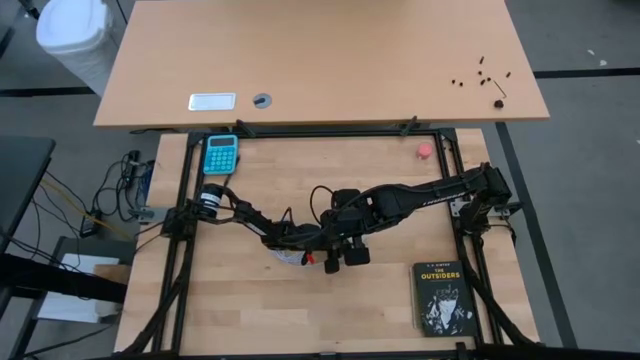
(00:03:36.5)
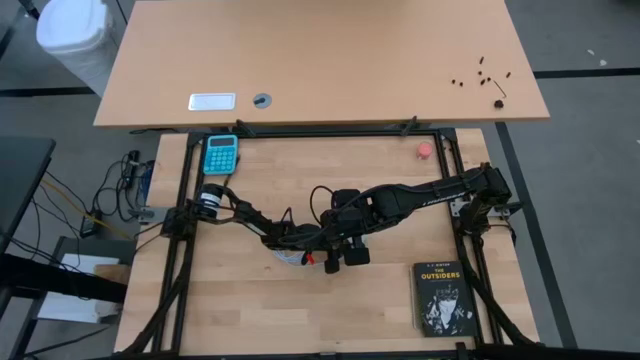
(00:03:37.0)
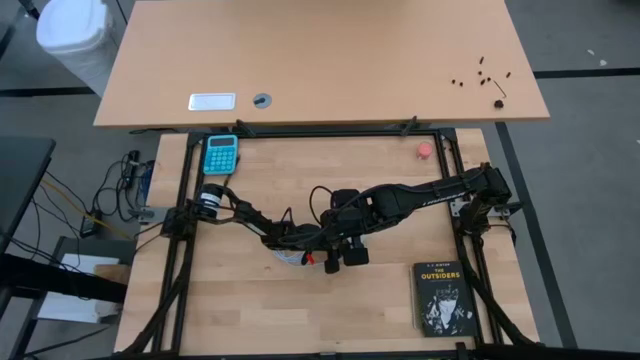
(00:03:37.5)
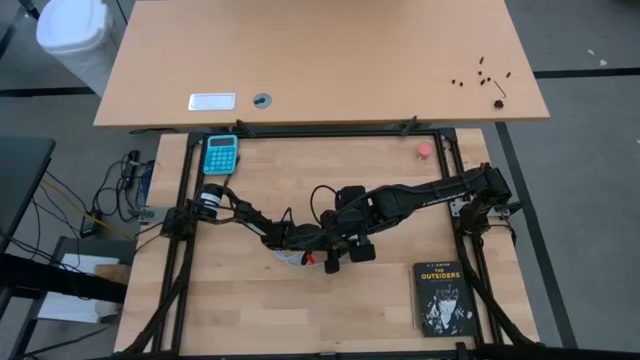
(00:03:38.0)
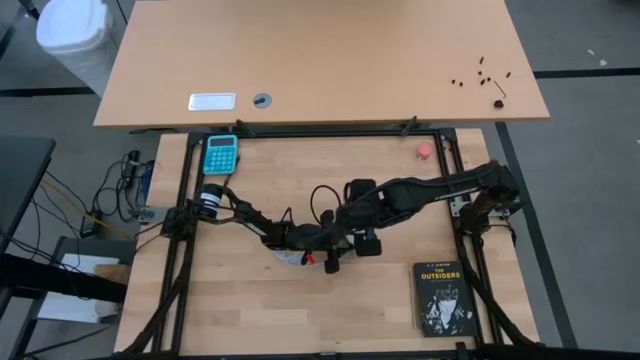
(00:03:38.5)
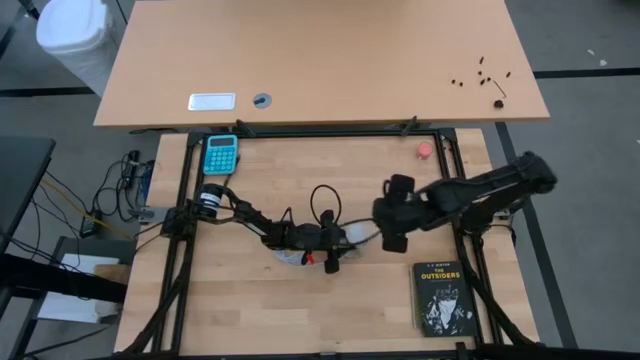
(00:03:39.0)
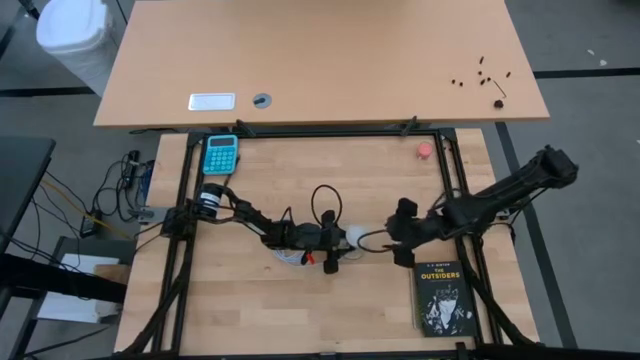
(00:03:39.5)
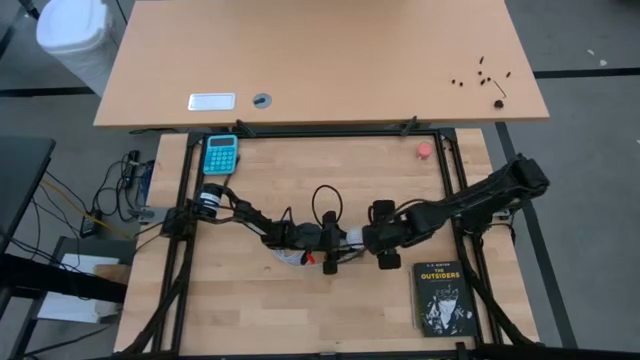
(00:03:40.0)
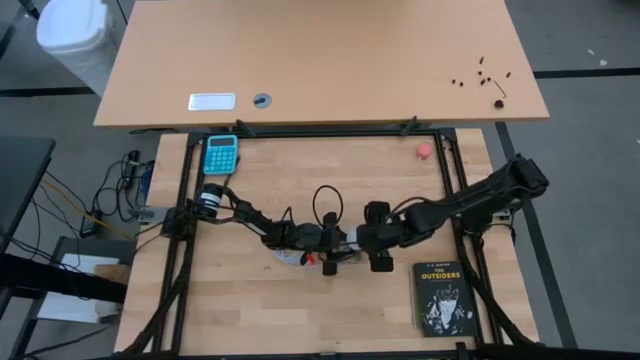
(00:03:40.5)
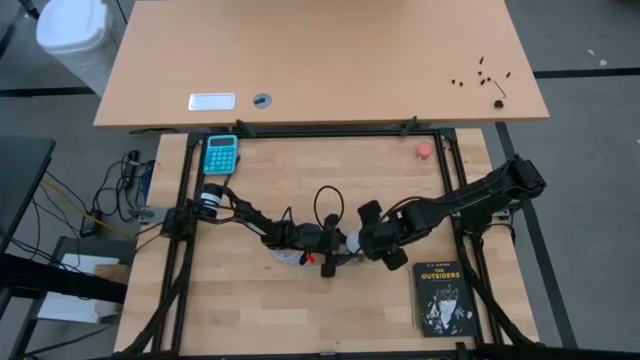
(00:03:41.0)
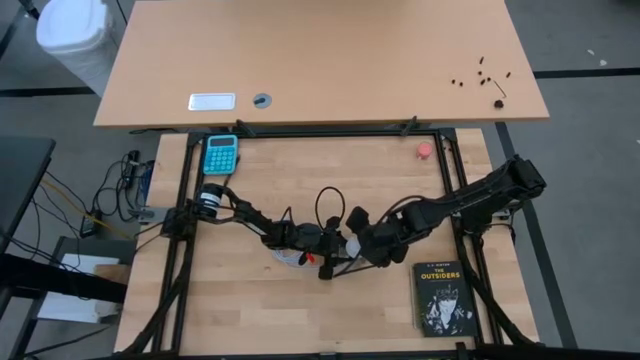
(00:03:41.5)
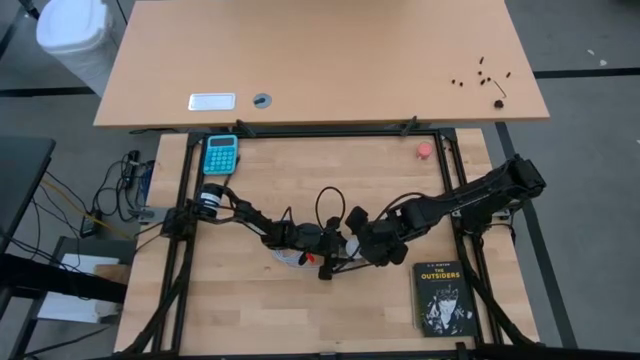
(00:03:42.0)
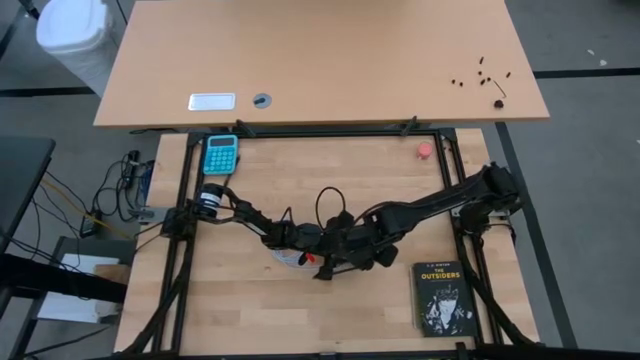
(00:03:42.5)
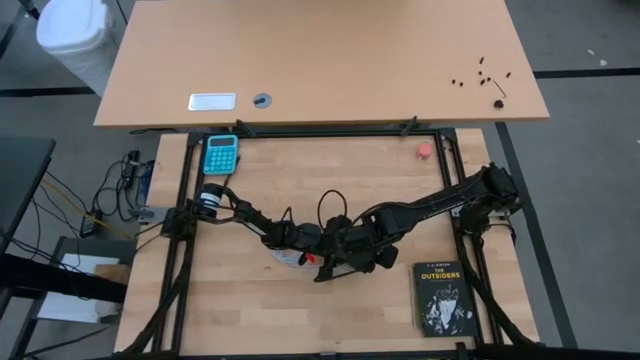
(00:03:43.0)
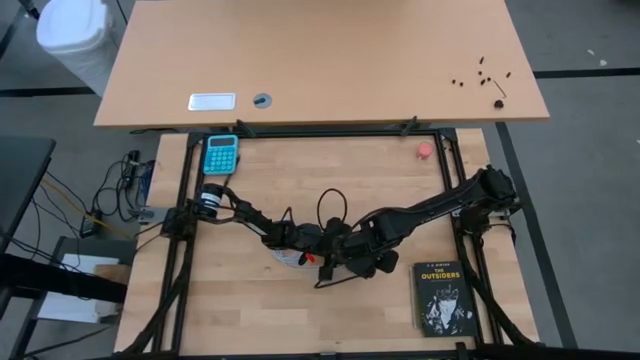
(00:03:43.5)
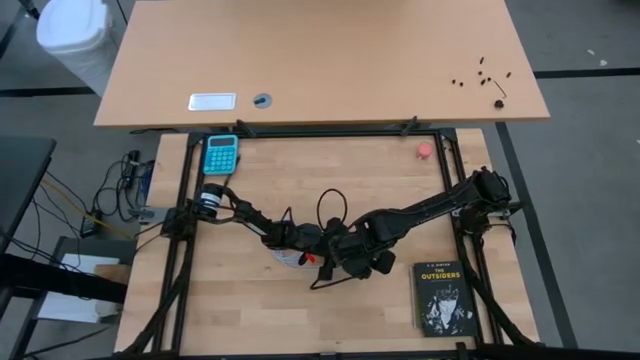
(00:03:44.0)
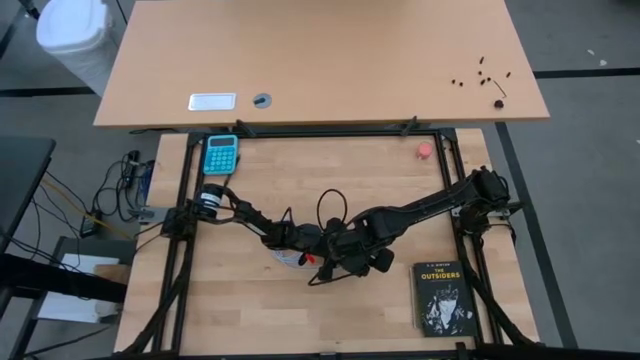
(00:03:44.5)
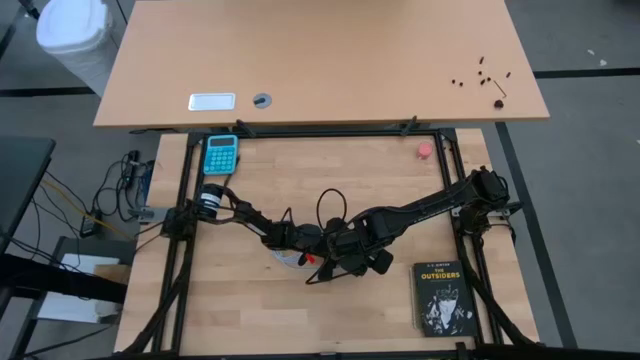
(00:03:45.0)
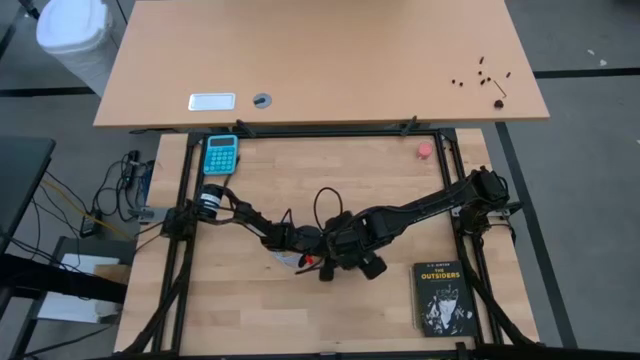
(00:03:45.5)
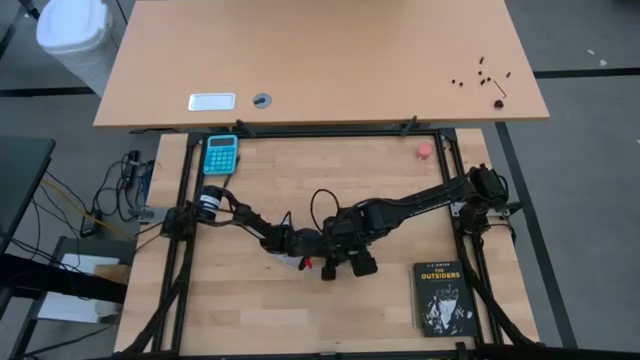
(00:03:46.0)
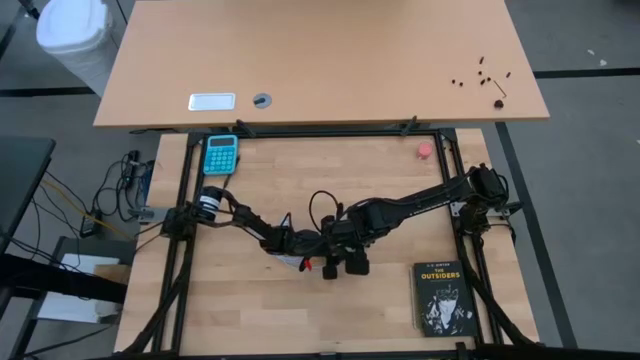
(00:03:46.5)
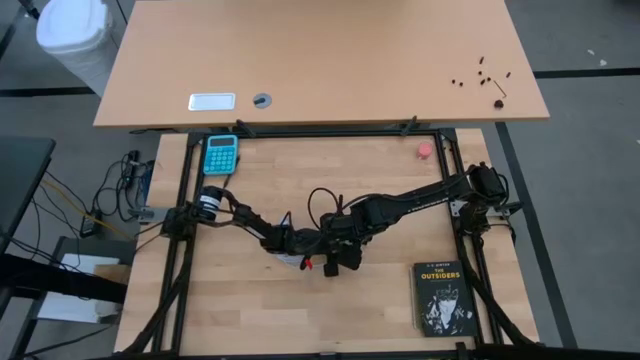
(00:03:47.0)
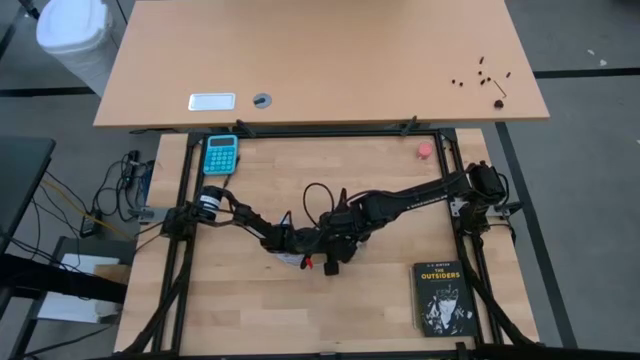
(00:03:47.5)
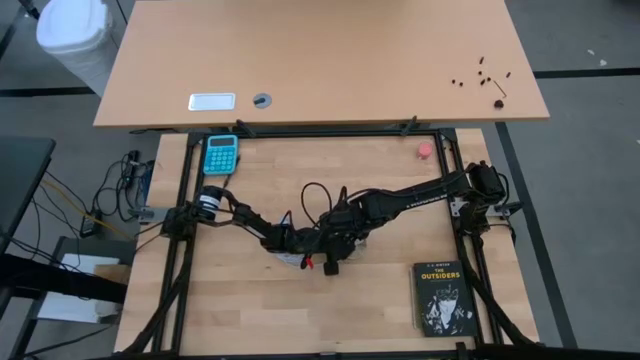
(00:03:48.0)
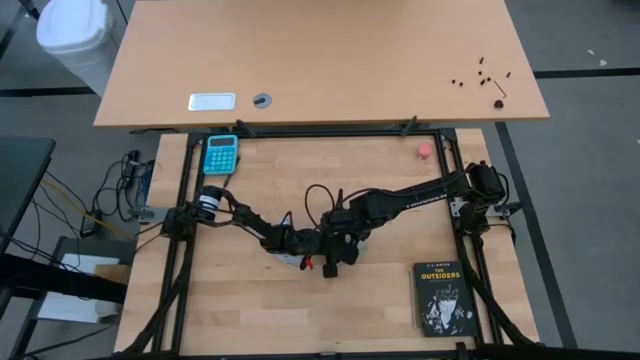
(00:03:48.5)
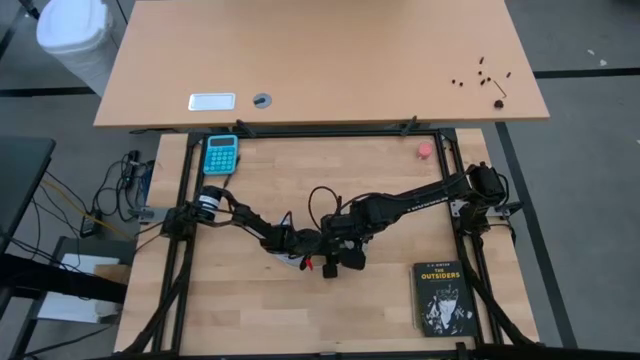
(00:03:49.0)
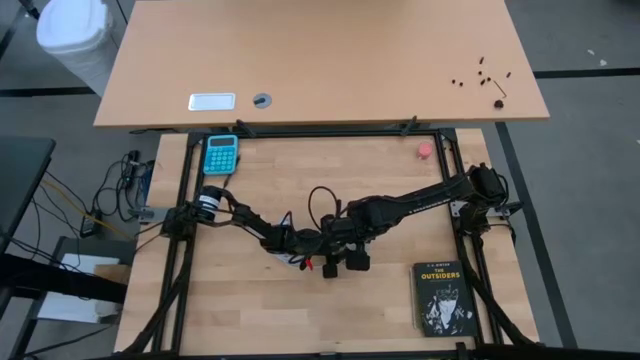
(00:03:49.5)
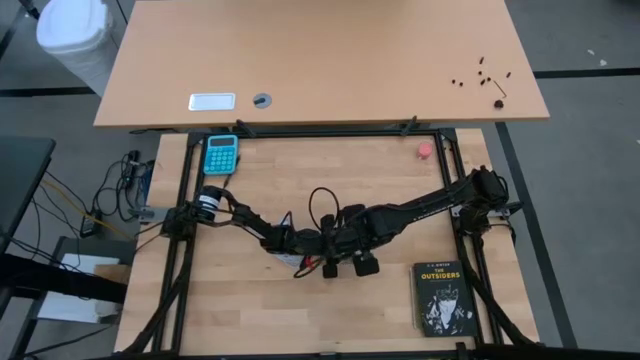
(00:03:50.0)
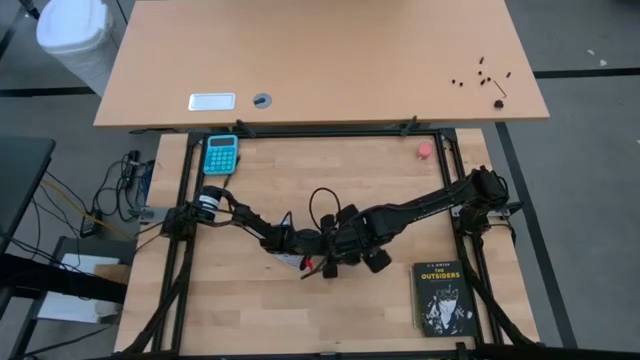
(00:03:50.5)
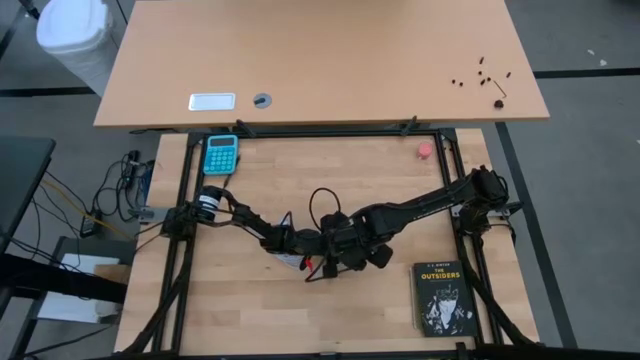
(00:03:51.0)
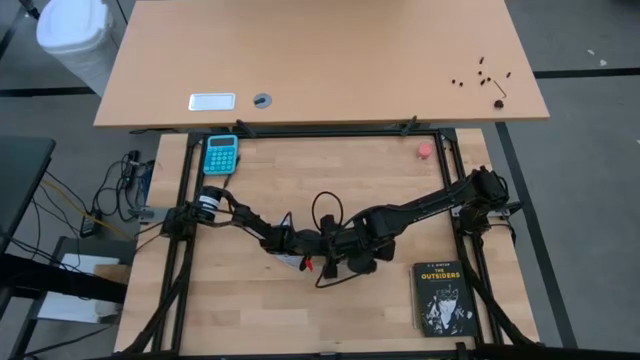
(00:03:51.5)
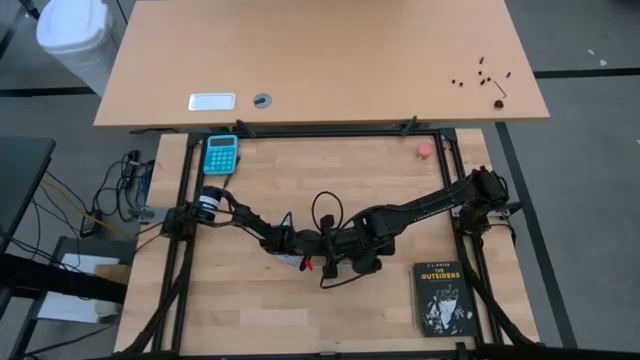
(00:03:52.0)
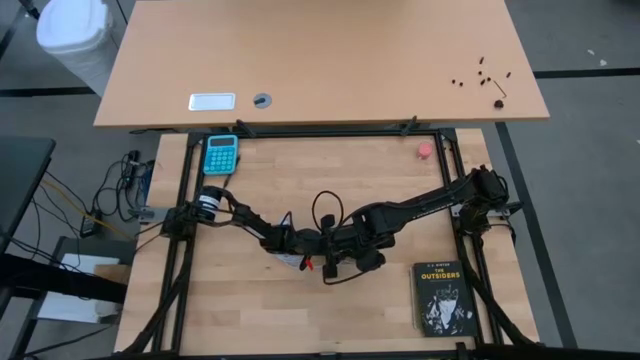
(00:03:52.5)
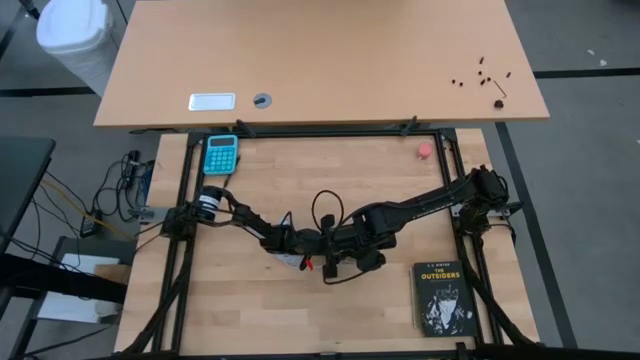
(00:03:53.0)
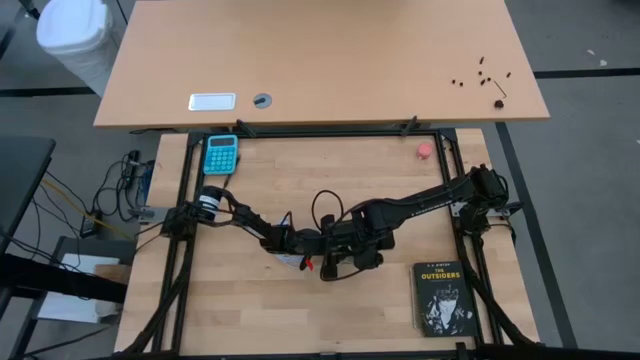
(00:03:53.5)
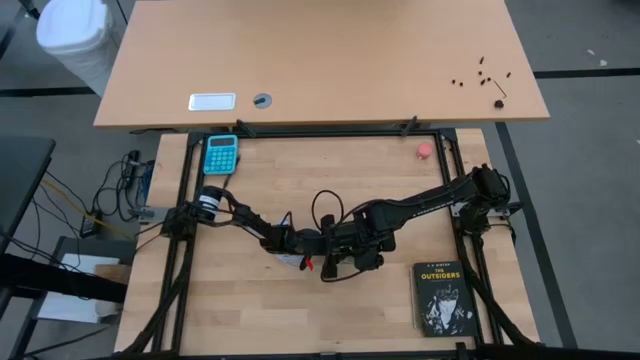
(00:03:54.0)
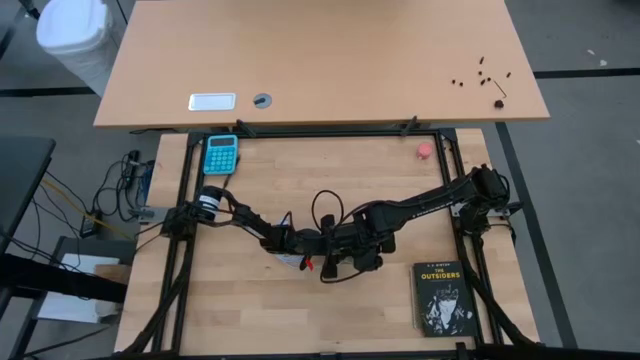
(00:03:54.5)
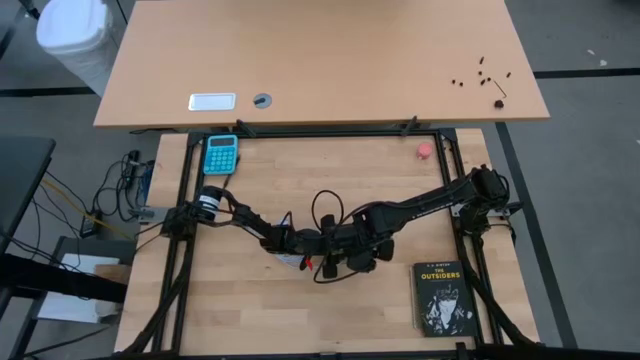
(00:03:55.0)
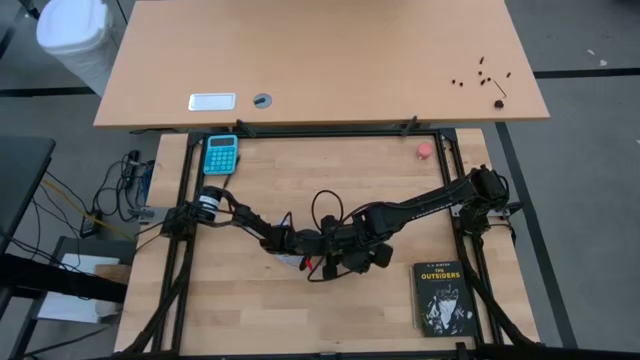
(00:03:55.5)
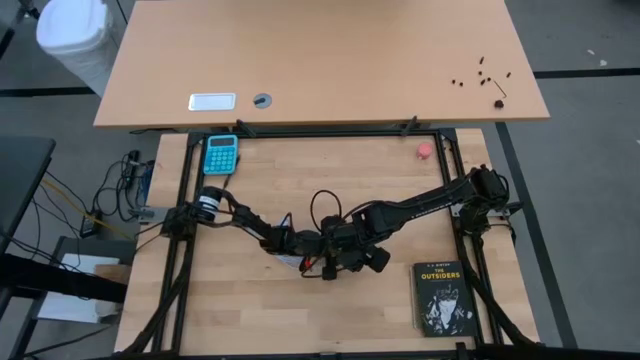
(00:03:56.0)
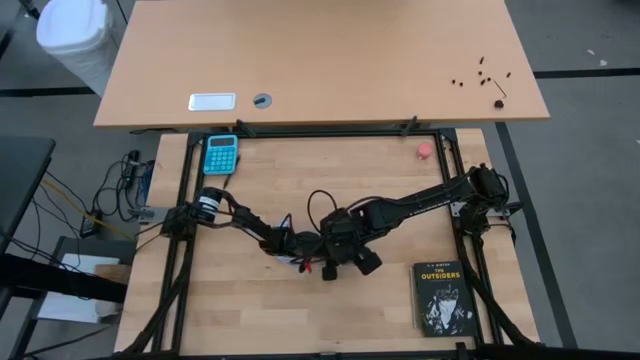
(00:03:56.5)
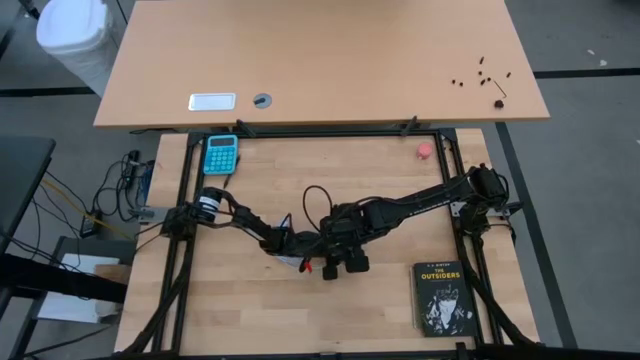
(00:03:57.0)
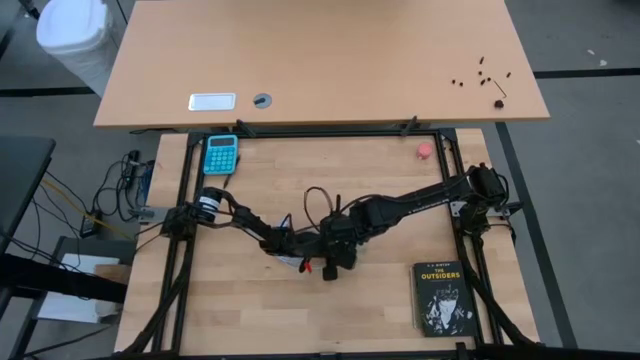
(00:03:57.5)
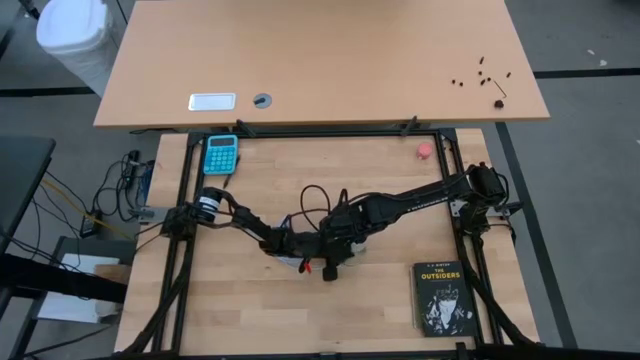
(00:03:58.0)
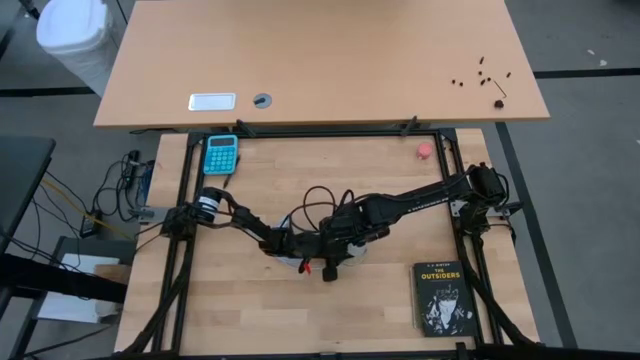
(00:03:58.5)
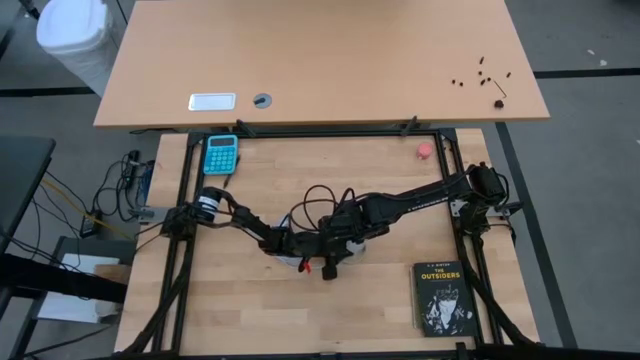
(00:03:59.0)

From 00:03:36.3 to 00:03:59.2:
Task: Screw lightbulb
Insert the lightbulb into the lamp
